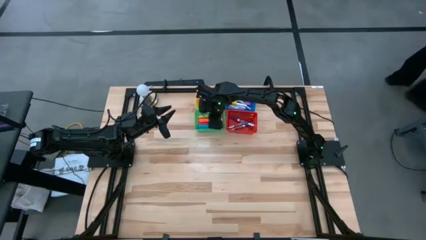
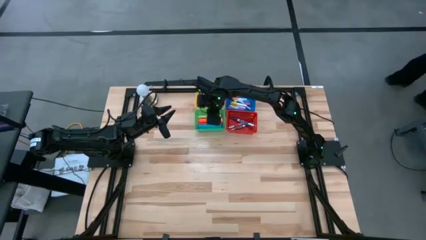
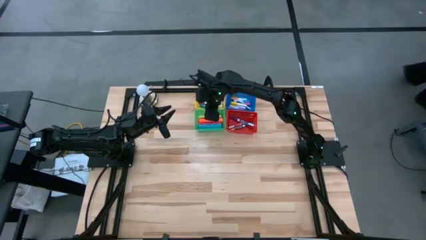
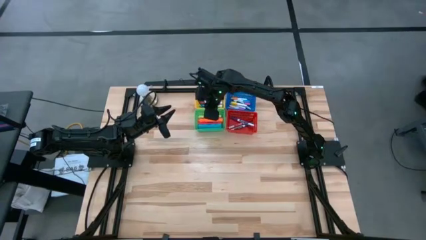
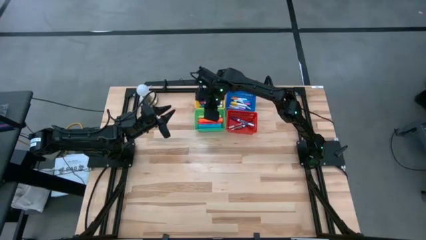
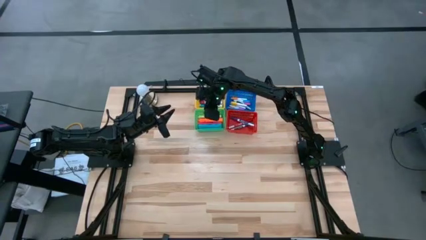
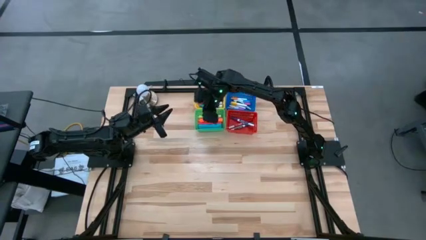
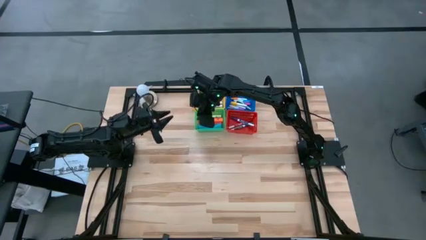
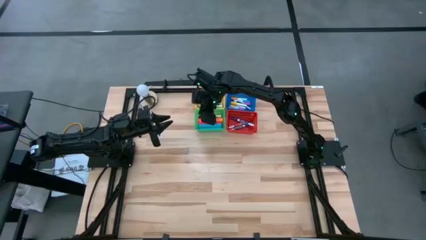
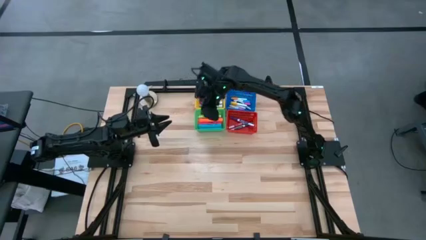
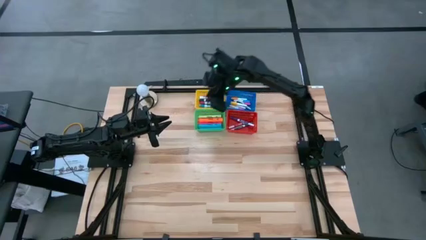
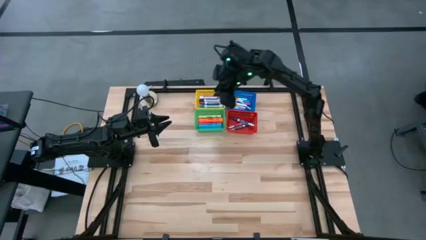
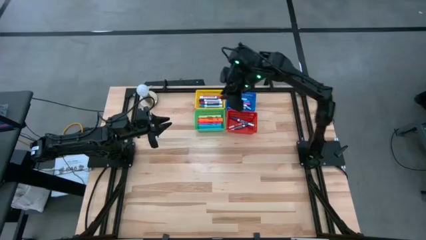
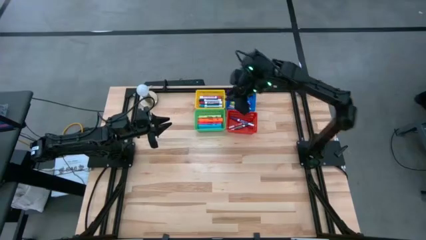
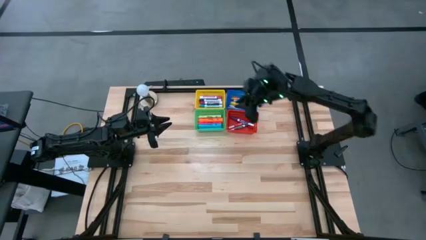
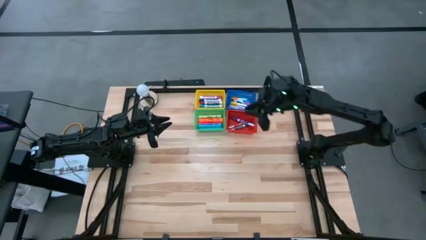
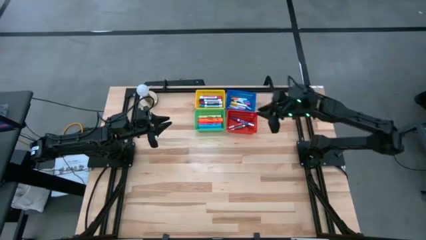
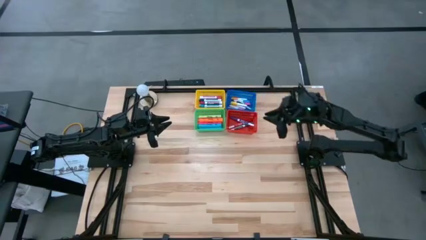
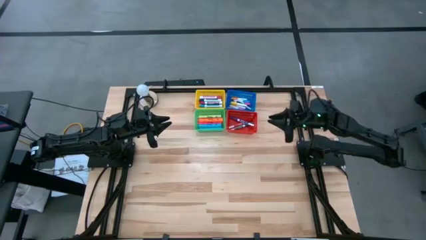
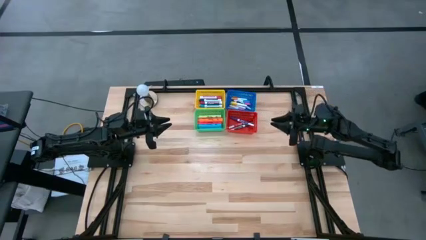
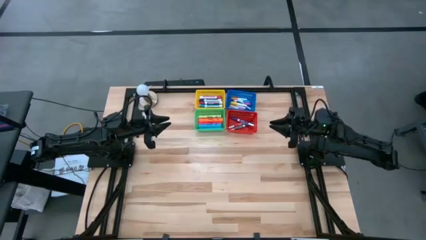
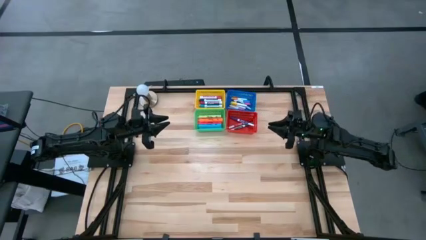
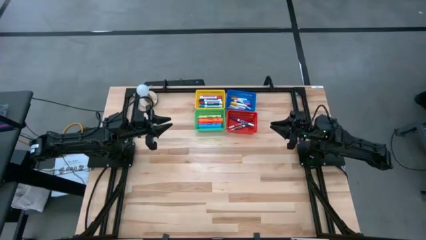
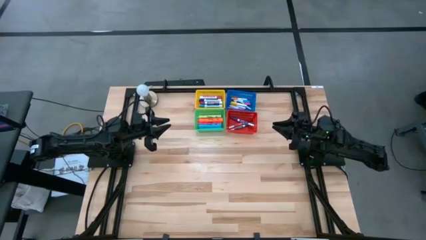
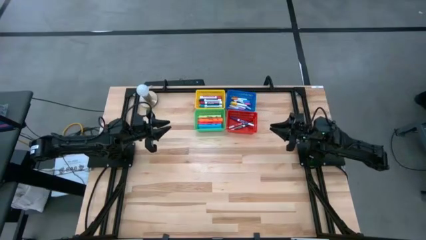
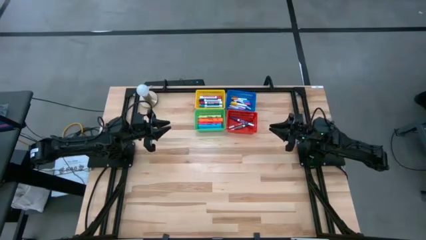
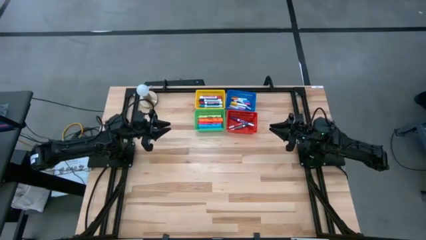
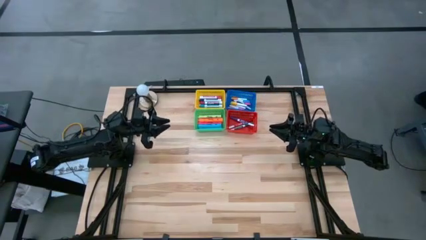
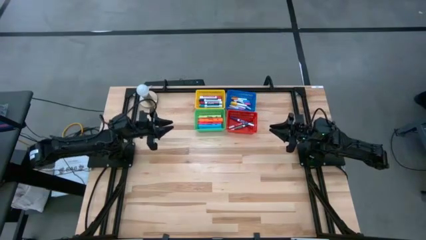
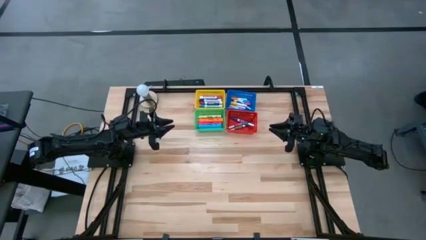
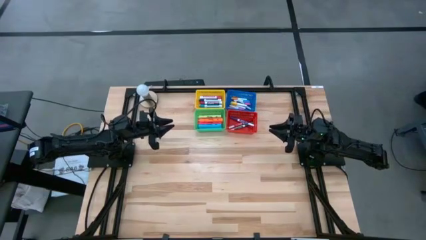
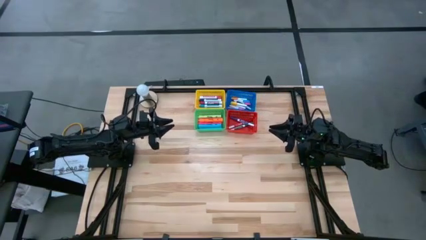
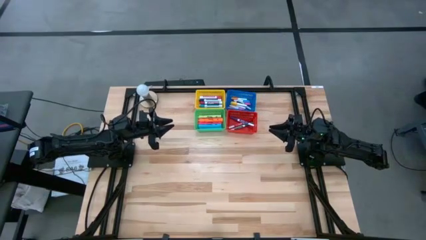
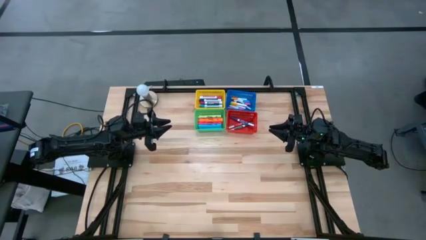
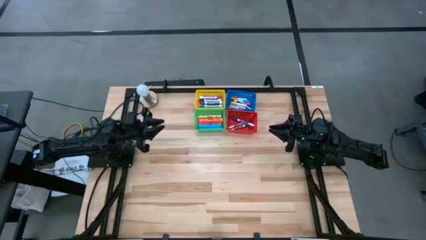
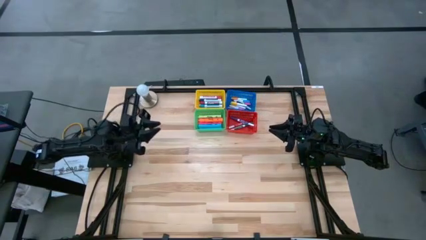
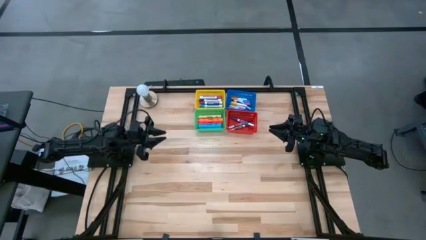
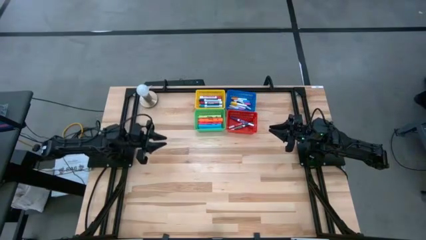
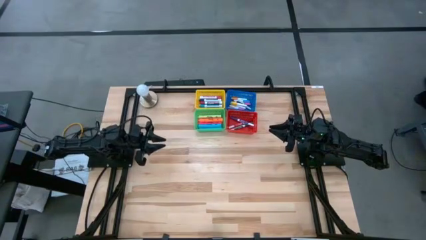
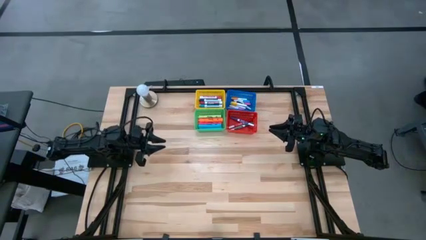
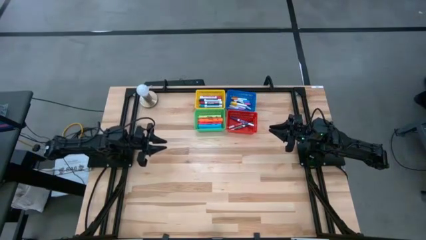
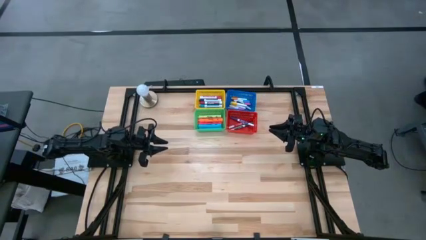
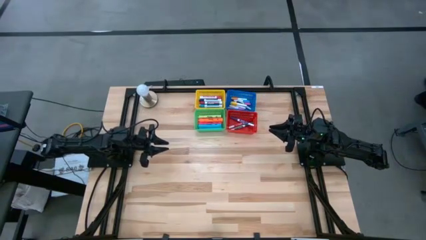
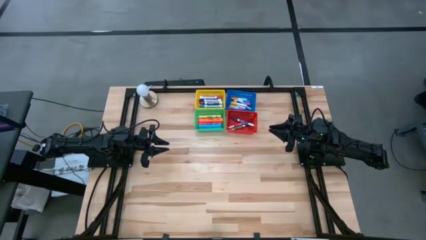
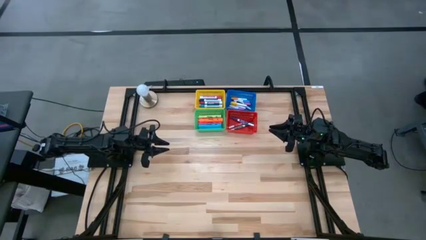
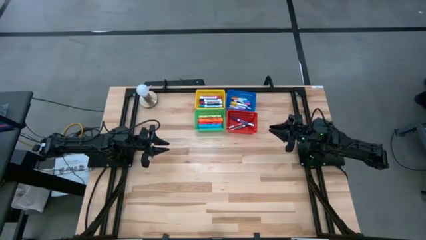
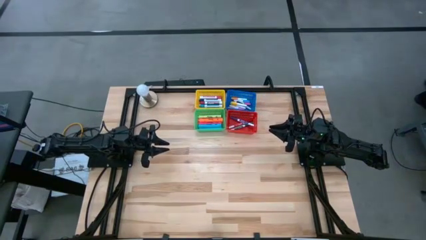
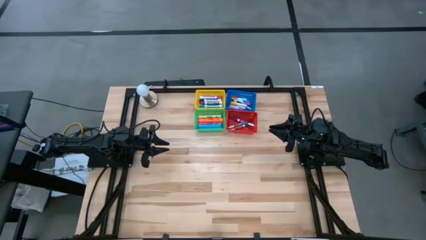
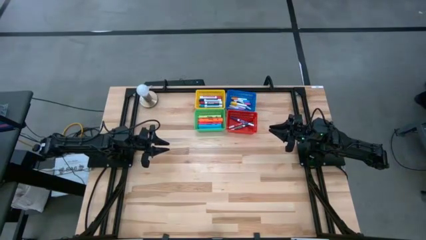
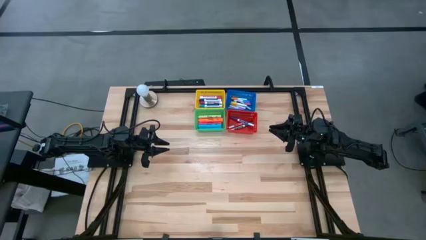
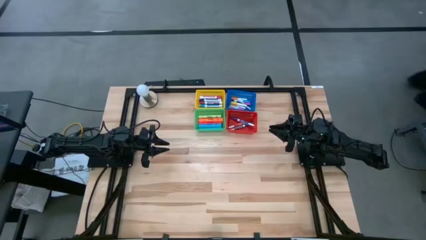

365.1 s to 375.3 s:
Task: Pick & Place Markers
Return to Home Position
